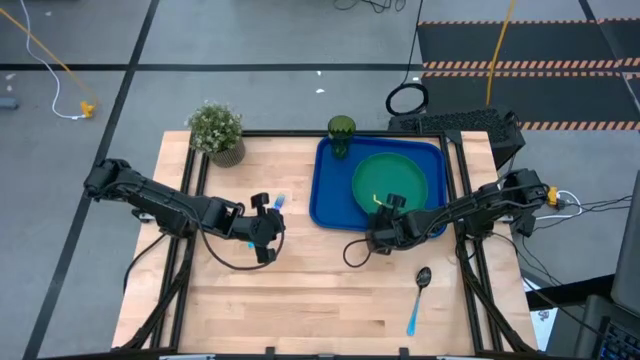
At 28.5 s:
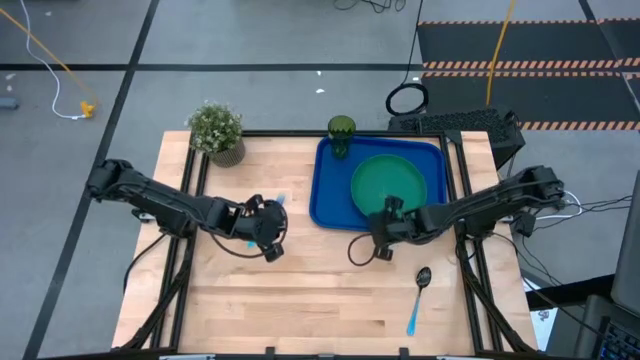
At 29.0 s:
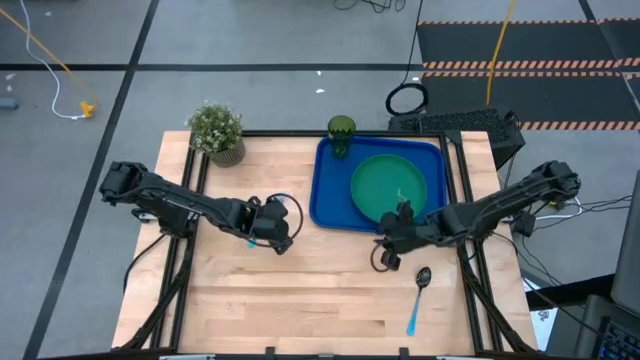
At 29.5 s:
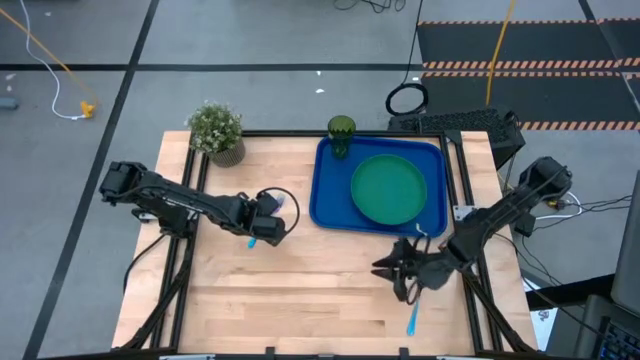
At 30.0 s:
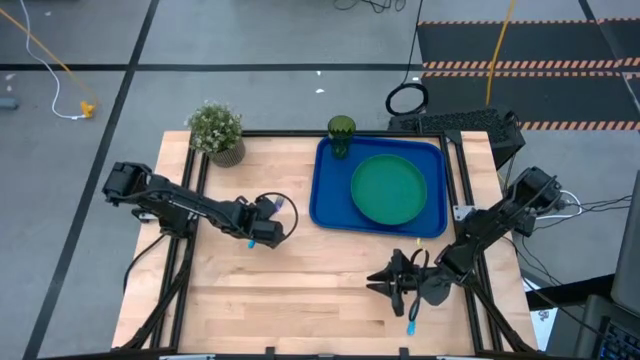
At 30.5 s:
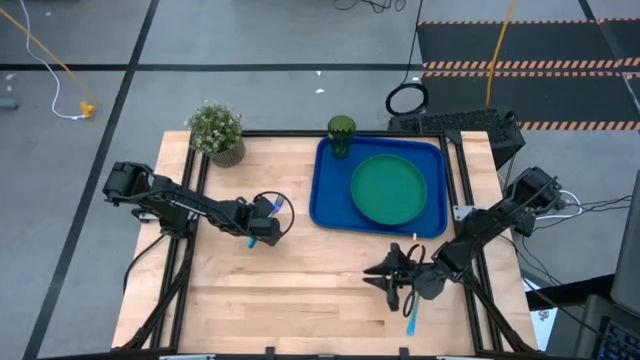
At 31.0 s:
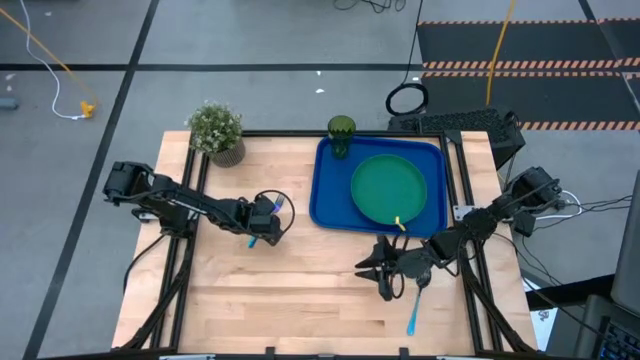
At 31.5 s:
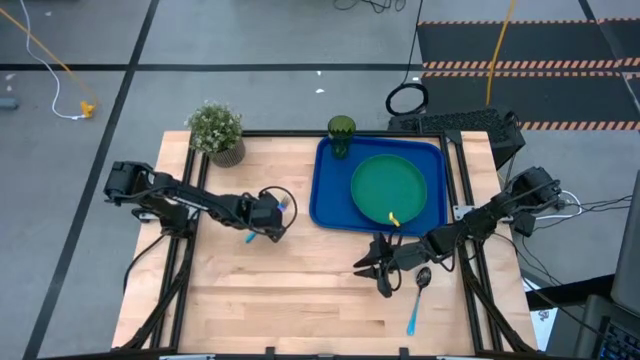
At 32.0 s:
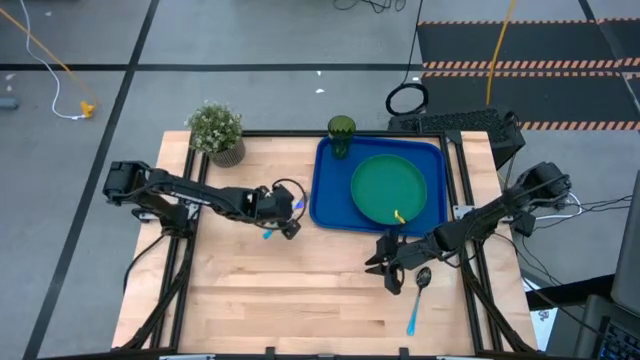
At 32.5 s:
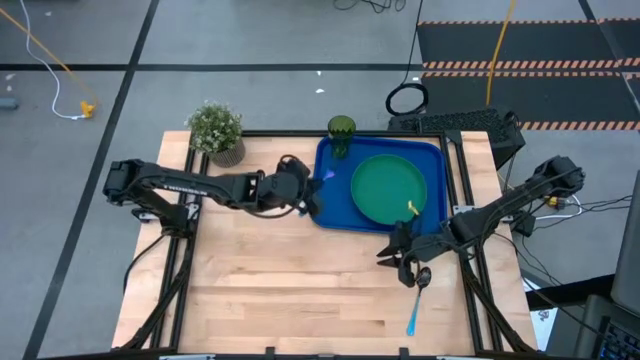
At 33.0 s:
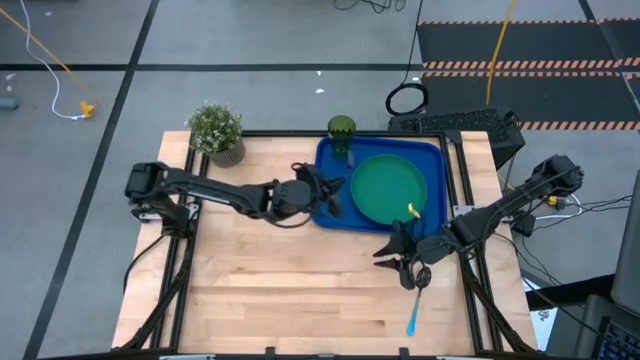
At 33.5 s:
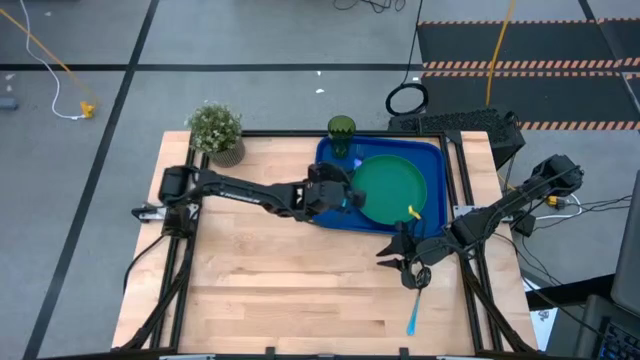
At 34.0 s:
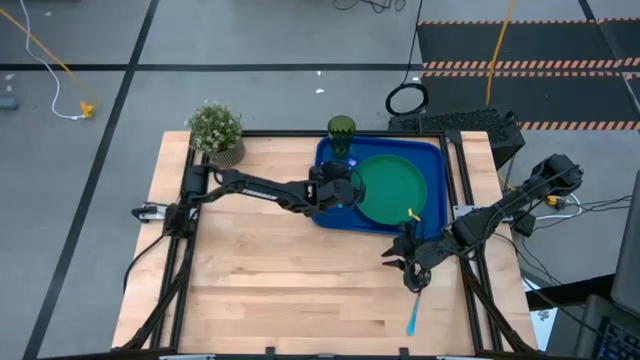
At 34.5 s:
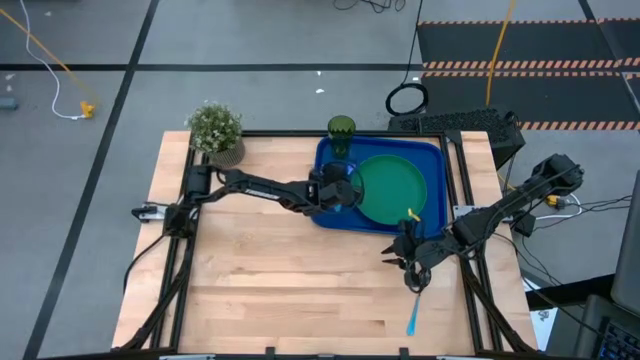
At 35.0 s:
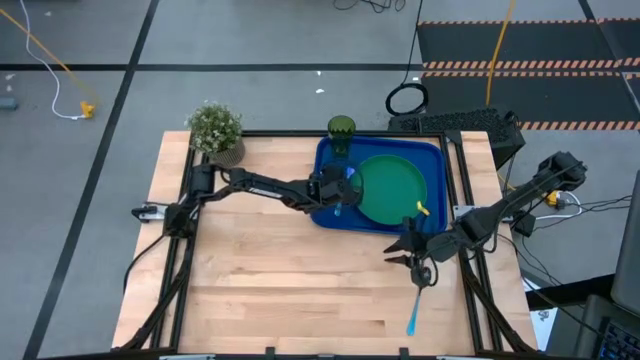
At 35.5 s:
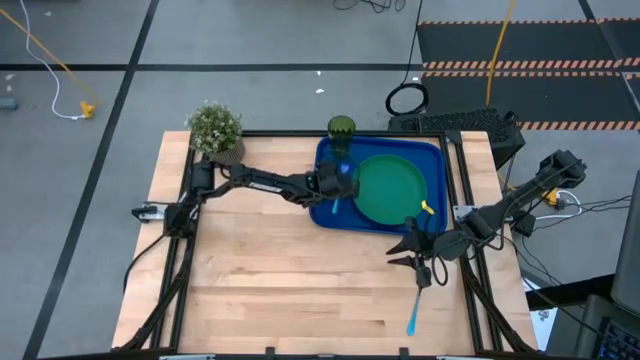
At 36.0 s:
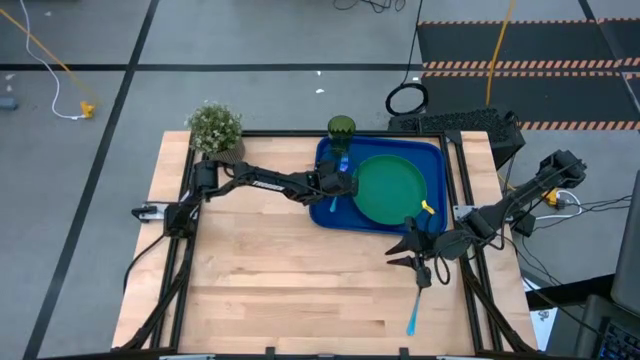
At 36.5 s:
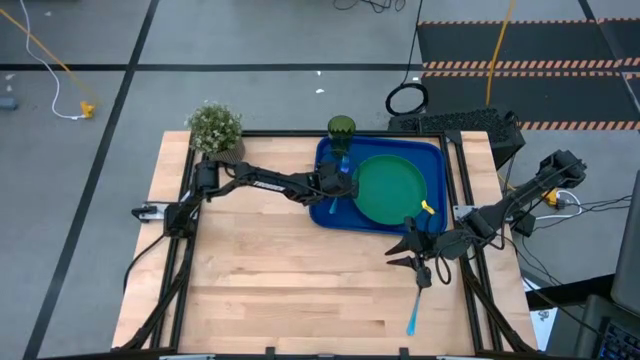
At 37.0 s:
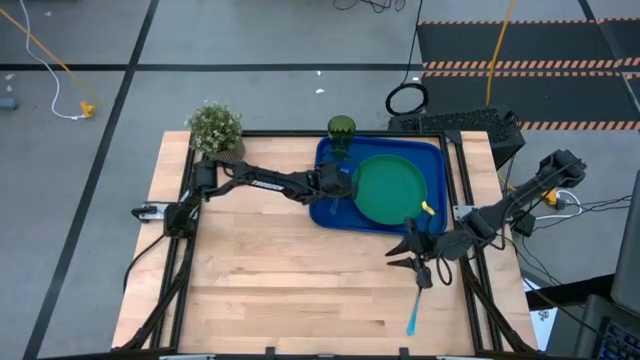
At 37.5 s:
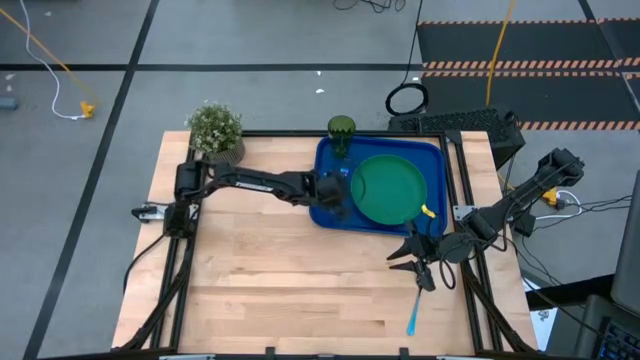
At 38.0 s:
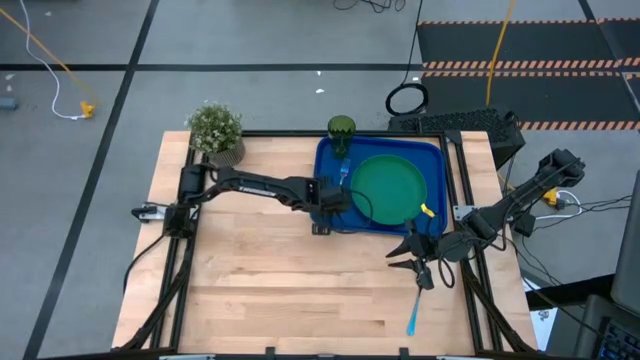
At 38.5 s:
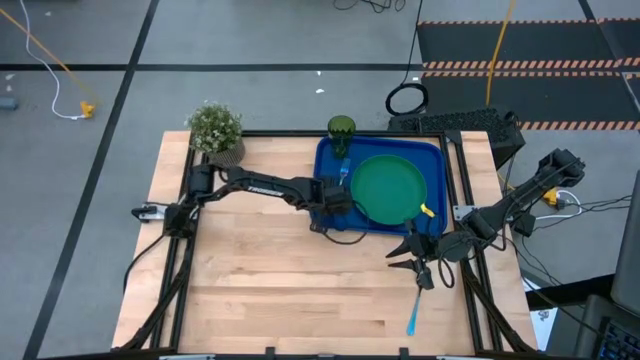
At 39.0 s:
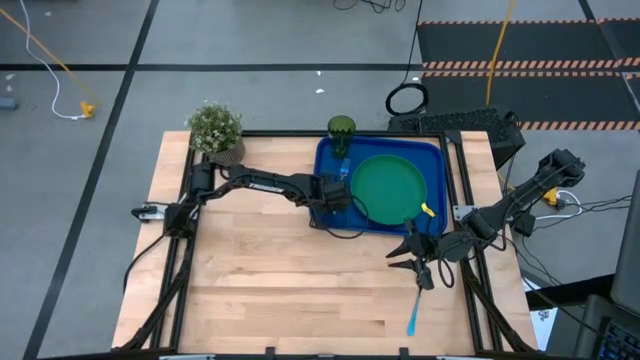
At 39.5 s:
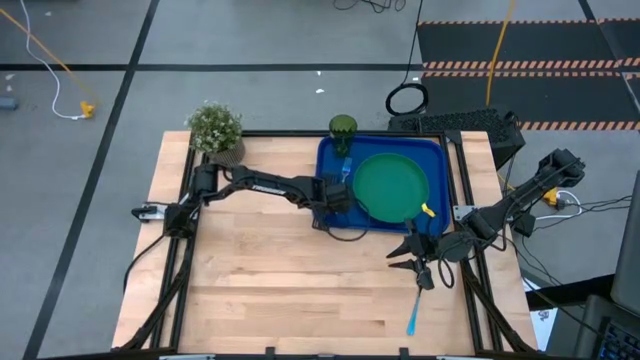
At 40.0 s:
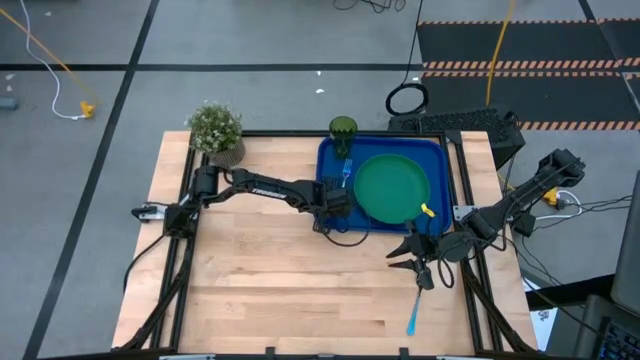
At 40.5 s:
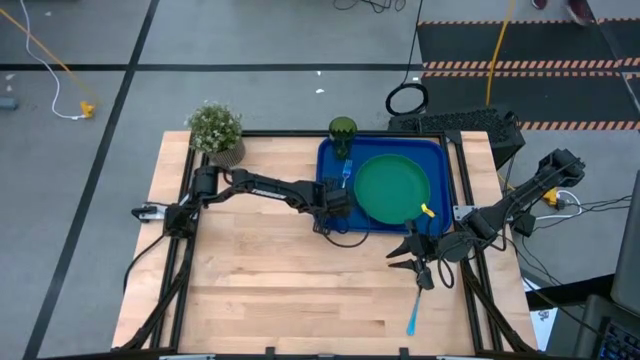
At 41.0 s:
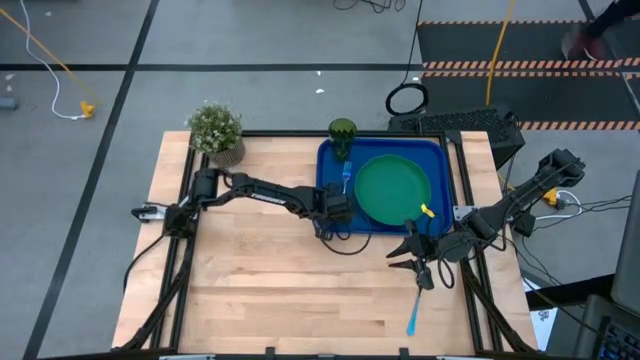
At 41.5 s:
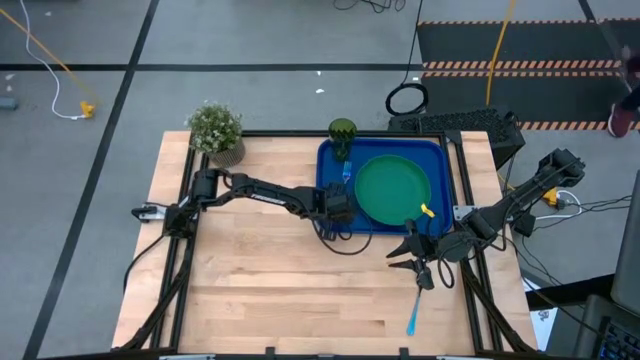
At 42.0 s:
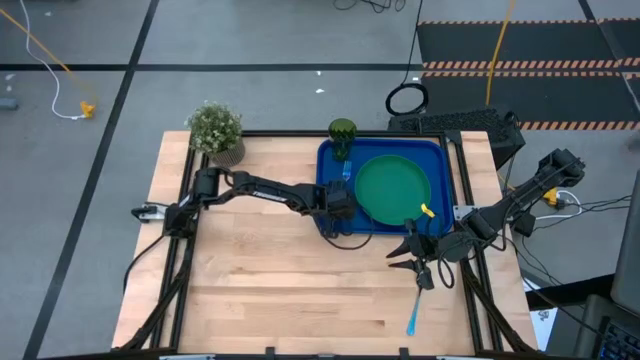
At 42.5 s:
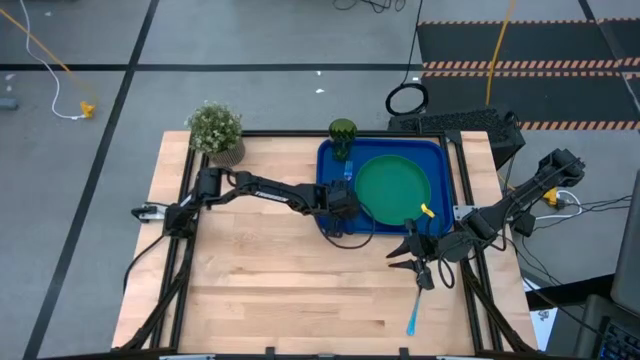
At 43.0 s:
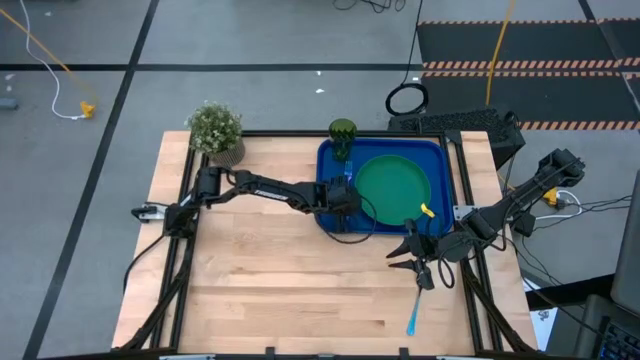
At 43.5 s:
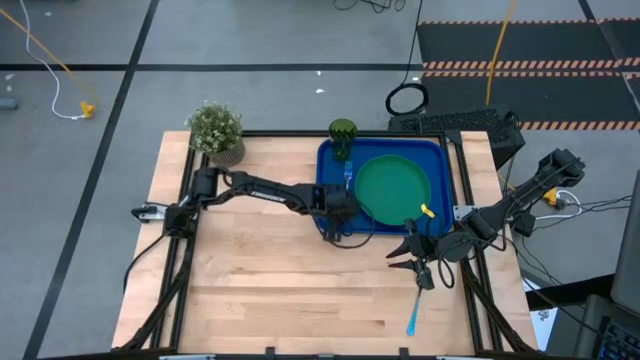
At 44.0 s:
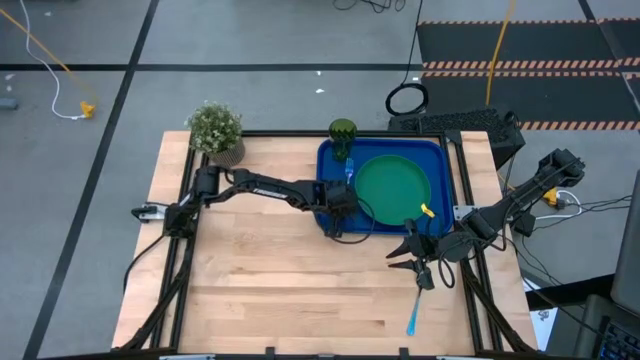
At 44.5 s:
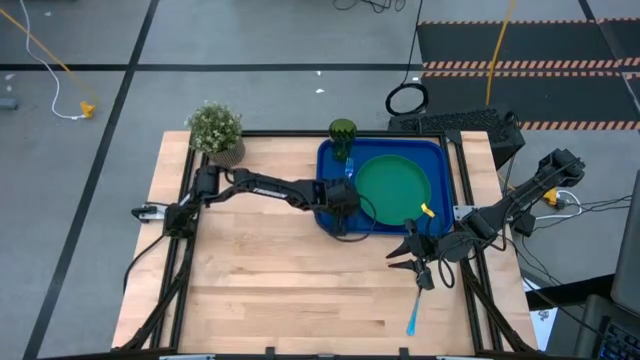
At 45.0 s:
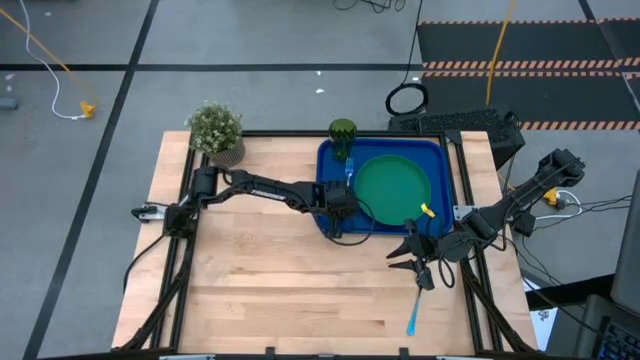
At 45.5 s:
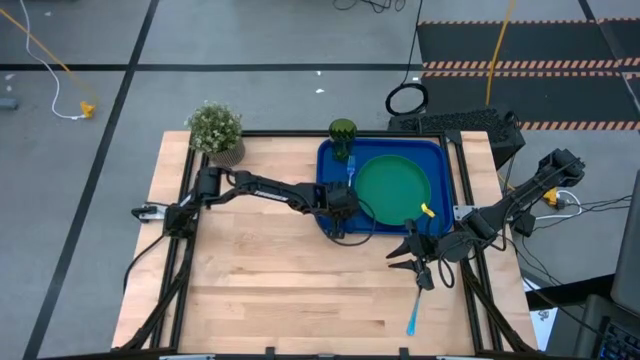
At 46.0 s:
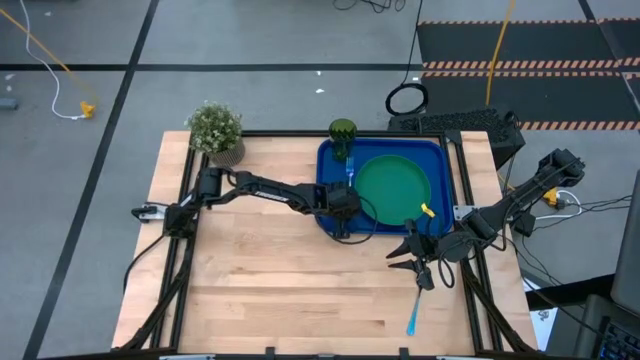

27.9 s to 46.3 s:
Task: Pick and place plate/cup/fork/spoon on tray
Put the blue fork on the blue serving tray to the left of the green plate

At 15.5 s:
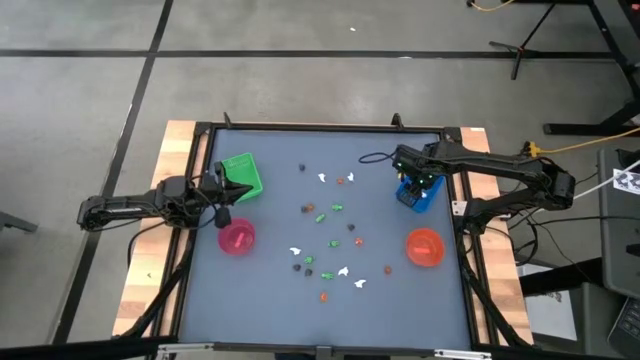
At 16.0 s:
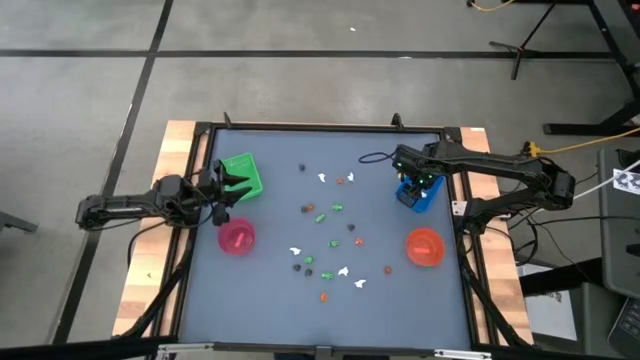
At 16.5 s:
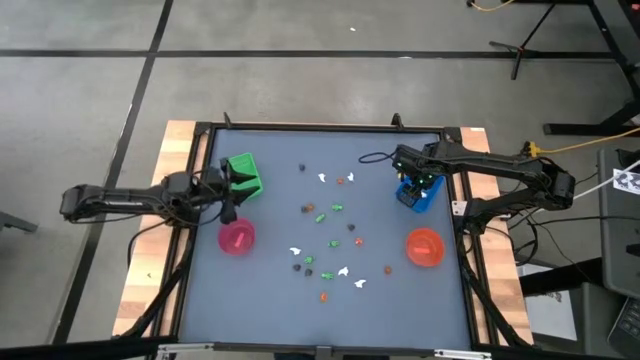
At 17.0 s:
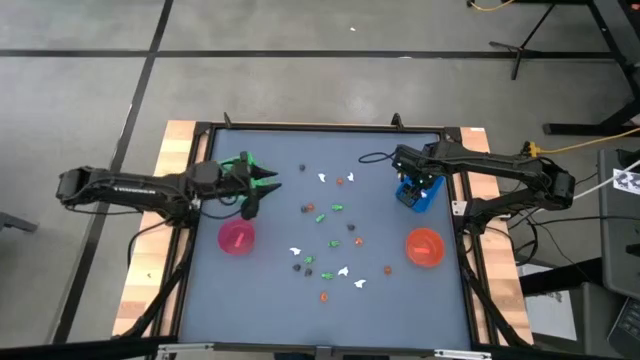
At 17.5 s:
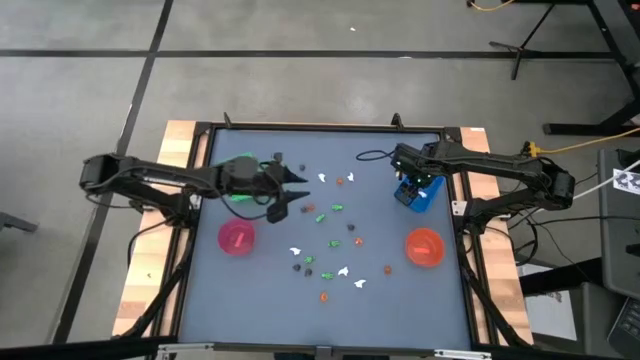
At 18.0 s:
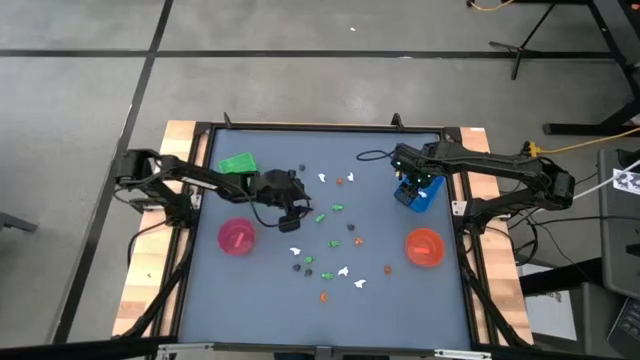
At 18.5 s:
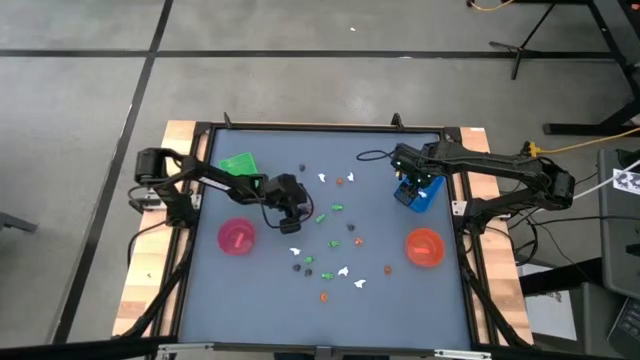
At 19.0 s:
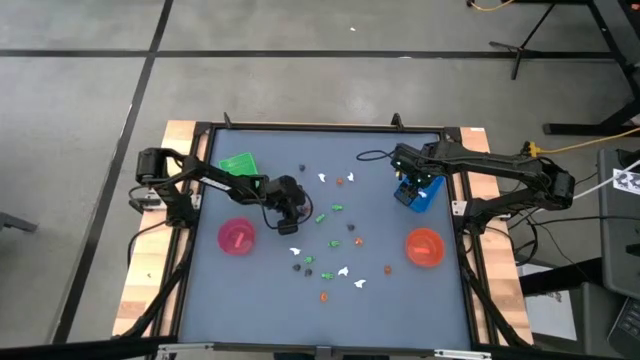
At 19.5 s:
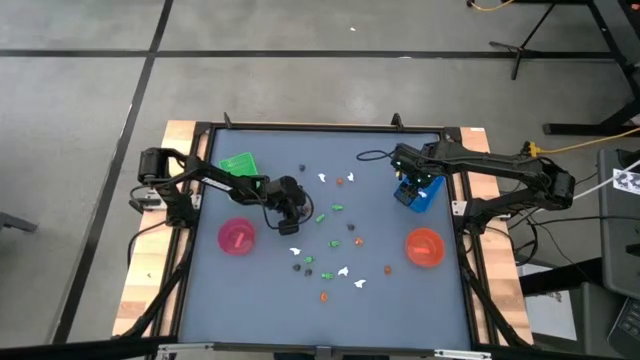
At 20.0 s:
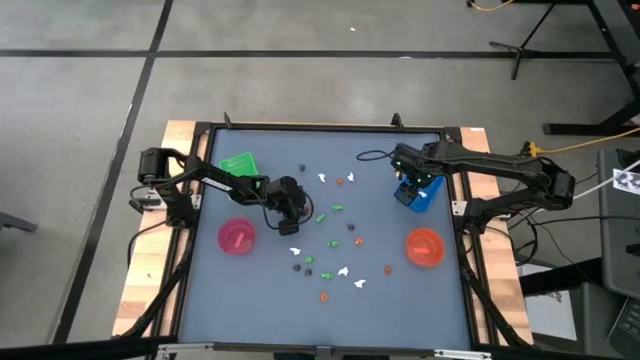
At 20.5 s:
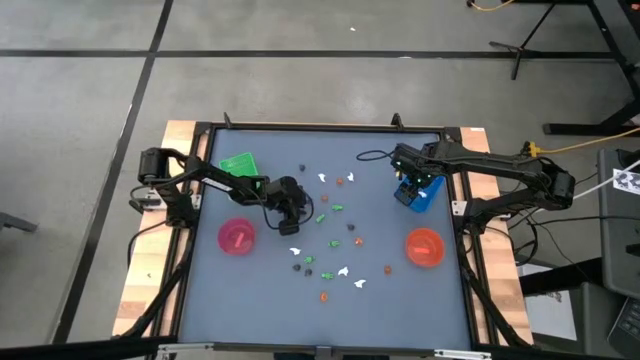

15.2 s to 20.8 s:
Task: Sort Halloween decoration
Put the small black skull toy into the green basket
